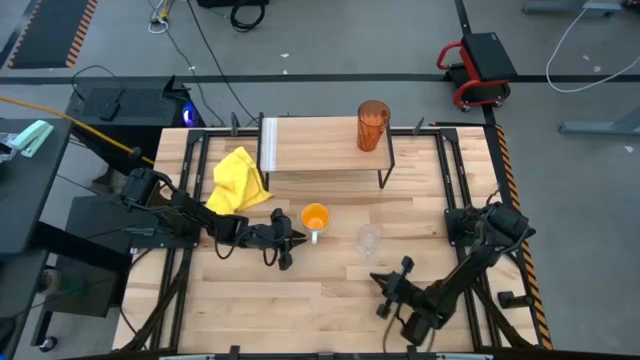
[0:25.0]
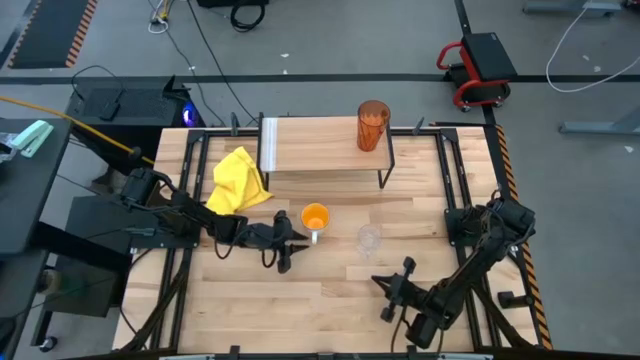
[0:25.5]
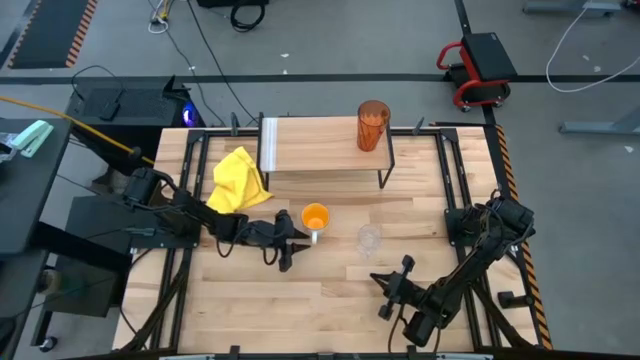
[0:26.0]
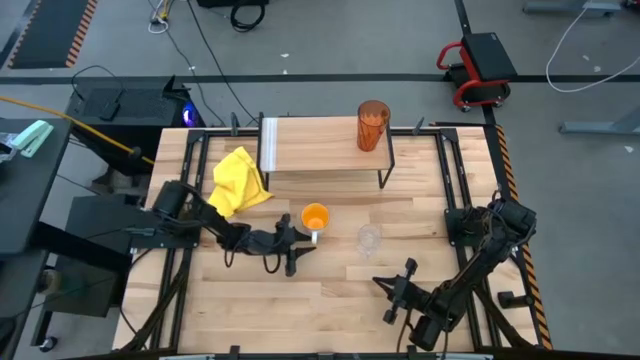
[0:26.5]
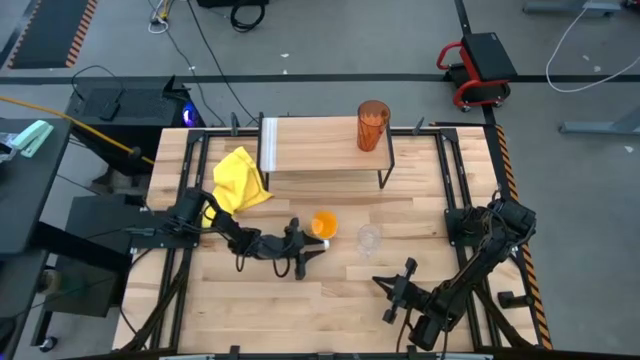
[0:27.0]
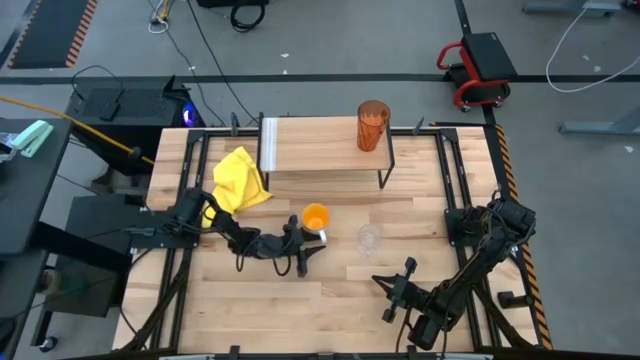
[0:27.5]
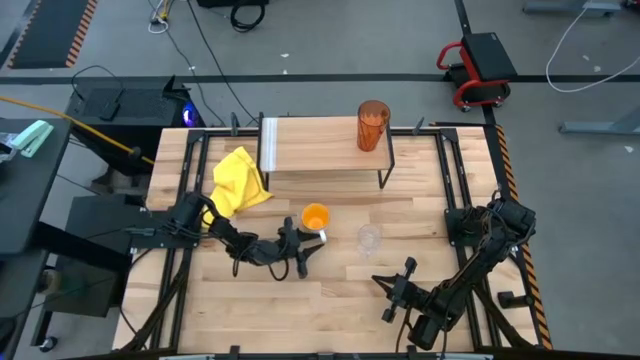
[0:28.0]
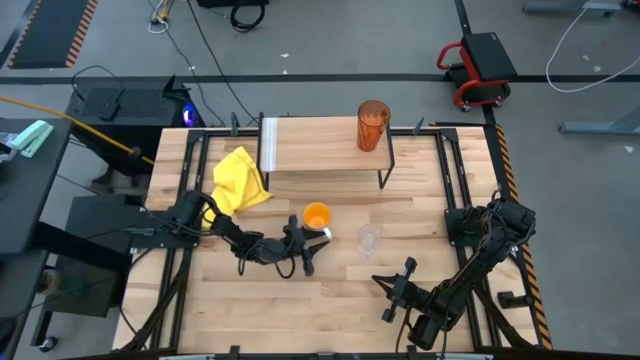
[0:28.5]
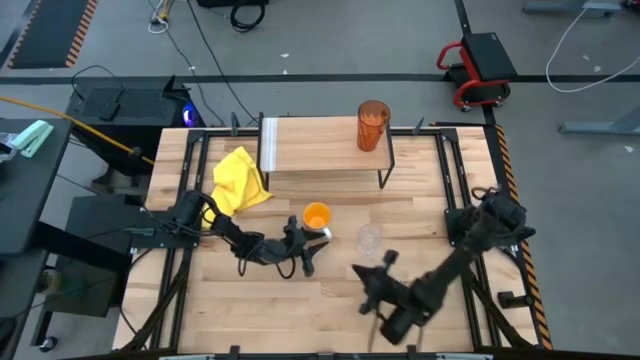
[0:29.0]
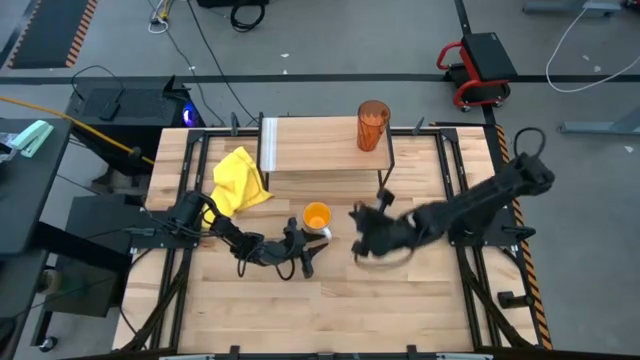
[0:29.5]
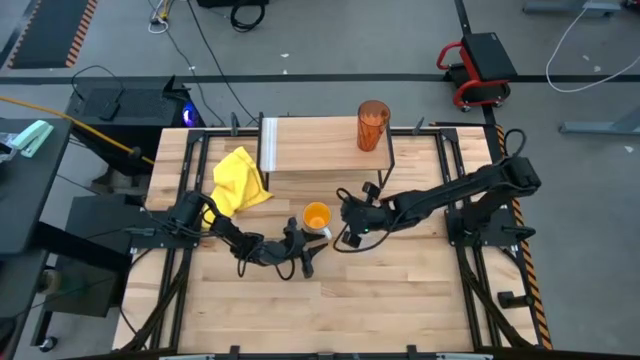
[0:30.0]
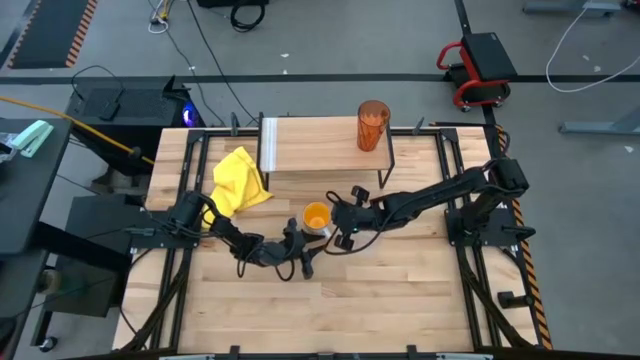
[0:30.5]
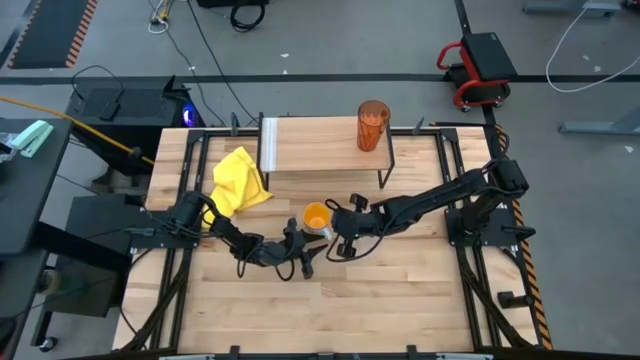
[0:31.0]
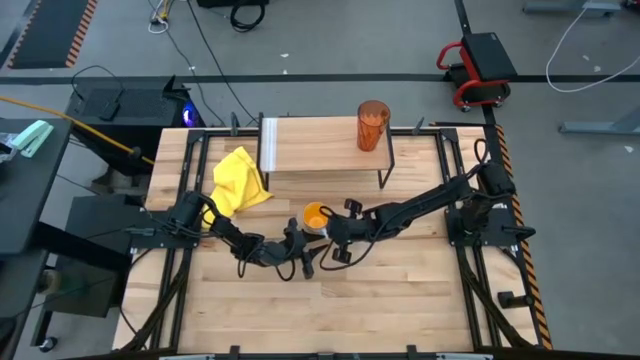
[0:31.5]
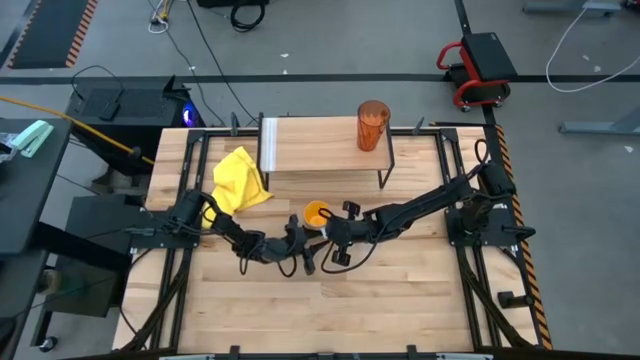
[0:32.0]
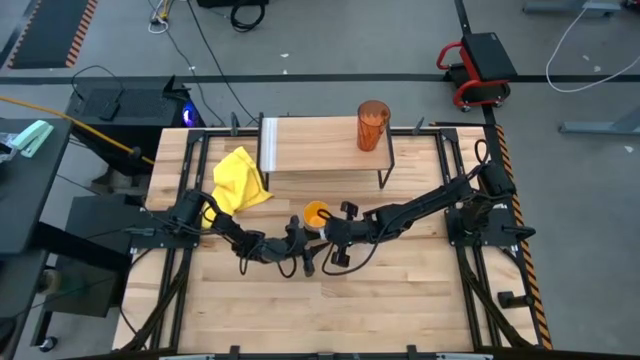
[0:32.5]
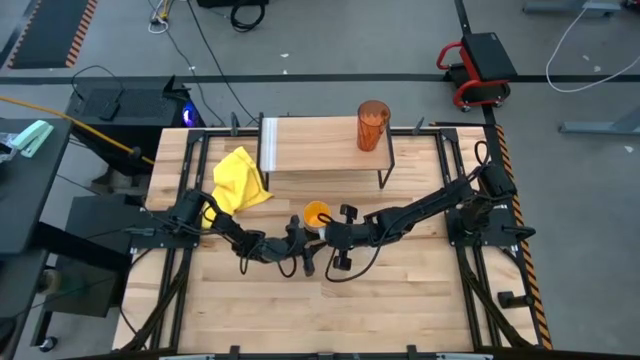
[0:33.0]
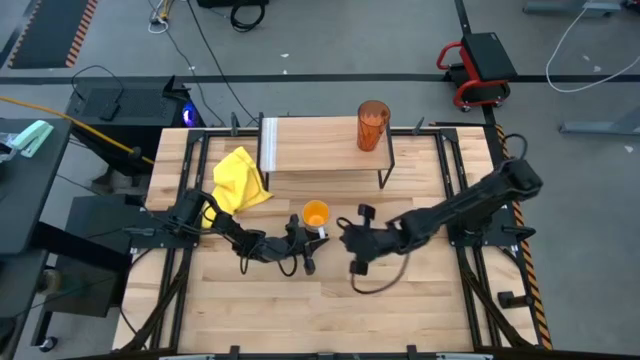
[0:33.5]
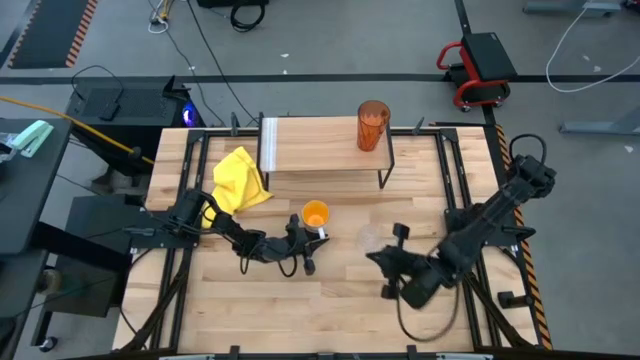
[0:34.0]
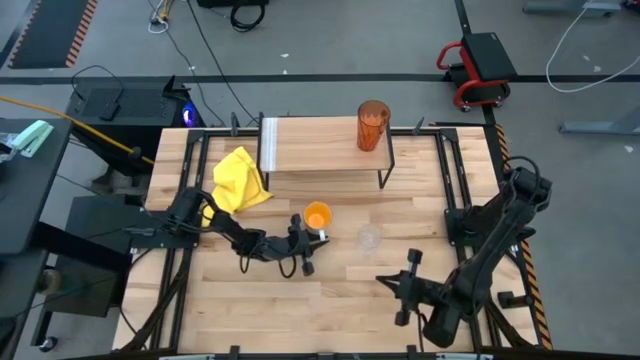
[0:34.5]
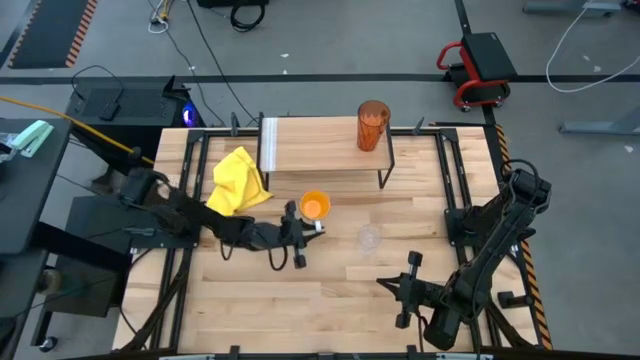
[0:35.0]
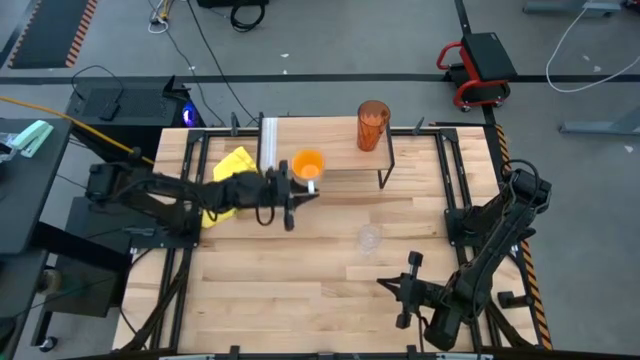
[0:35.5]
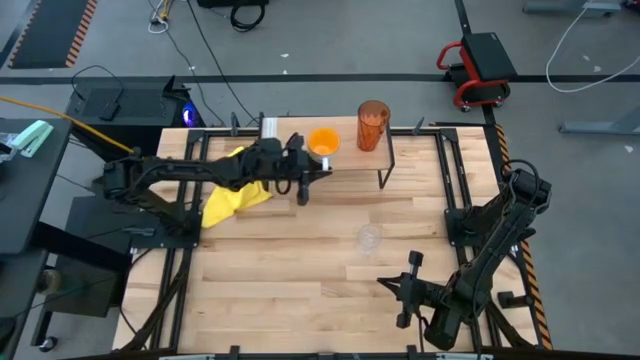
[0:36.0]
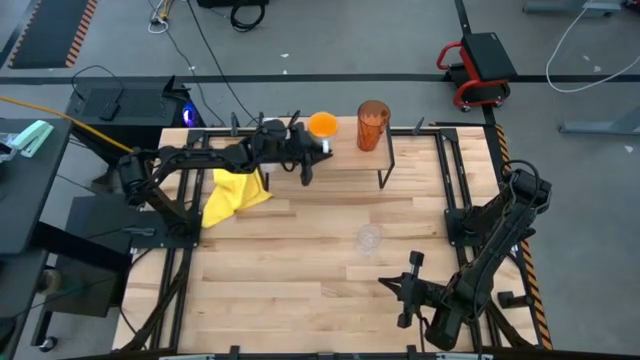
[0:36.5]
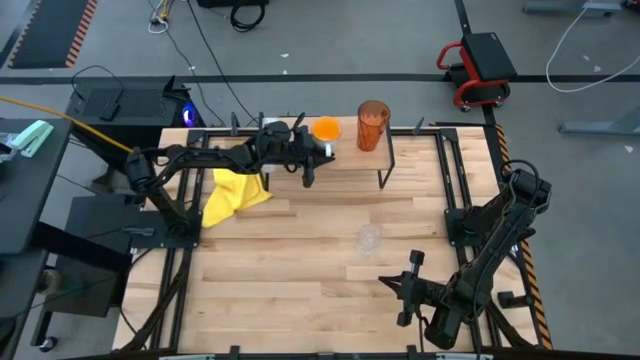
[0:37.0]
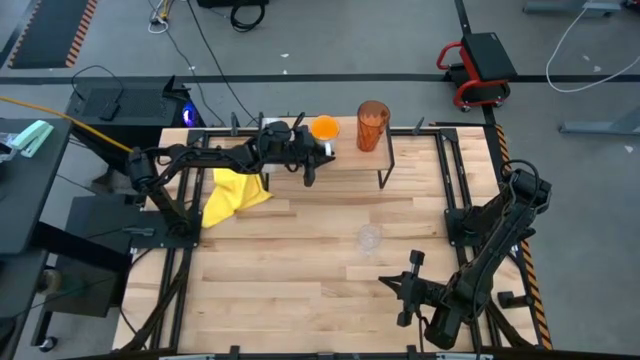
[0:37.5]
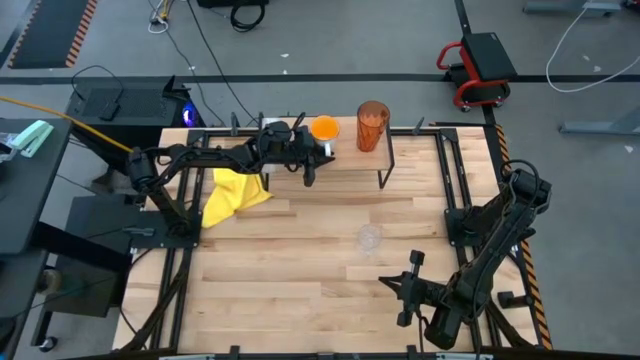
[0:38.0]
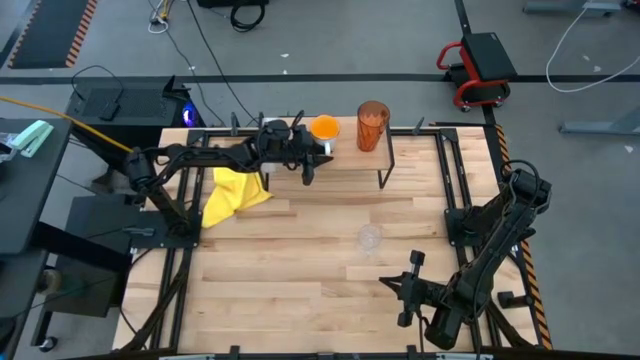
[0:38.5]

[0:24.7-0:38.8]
Task: Stack small to large cups/mugs on shelf
Put the yellow mug on the shelf

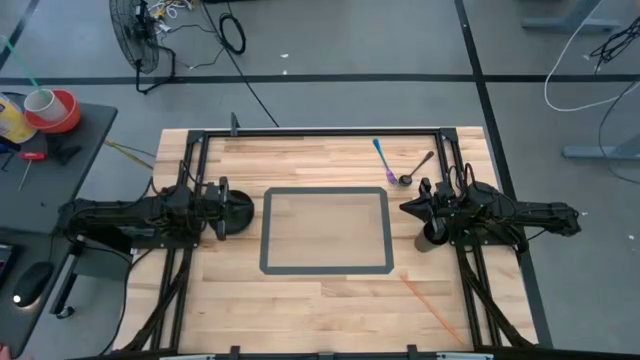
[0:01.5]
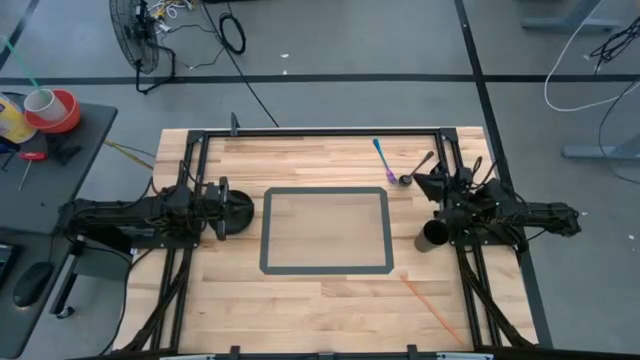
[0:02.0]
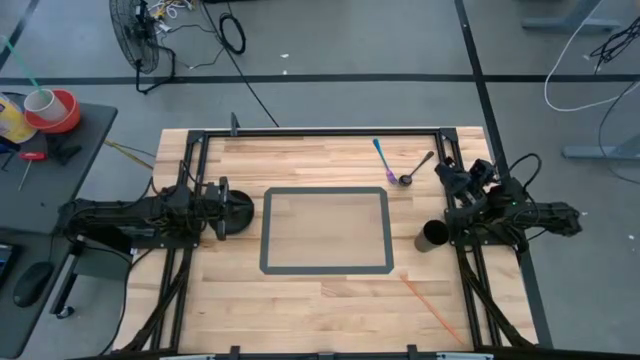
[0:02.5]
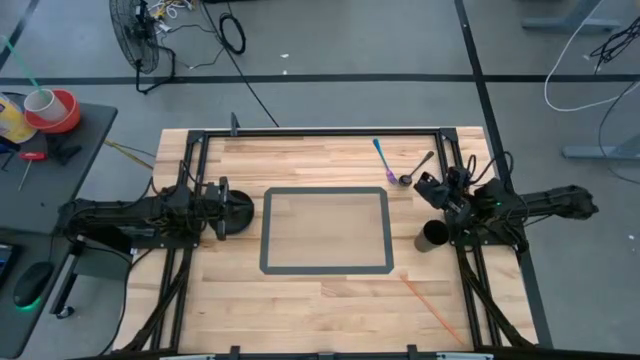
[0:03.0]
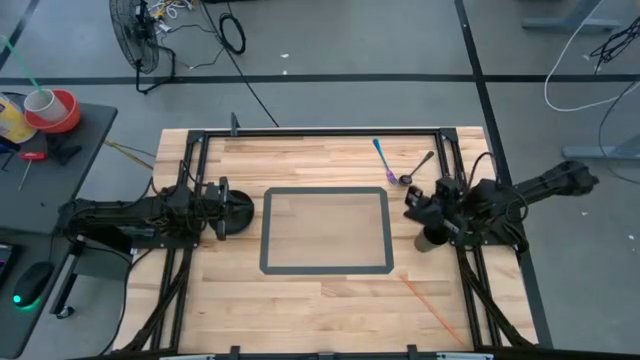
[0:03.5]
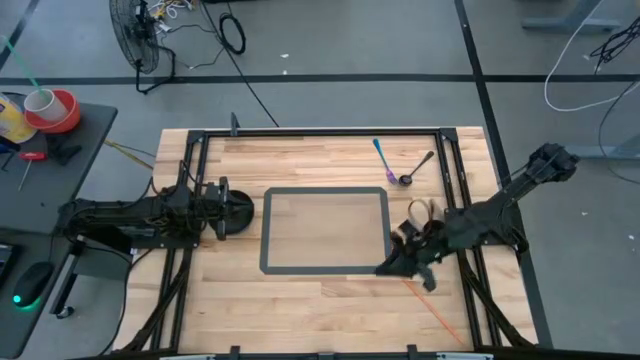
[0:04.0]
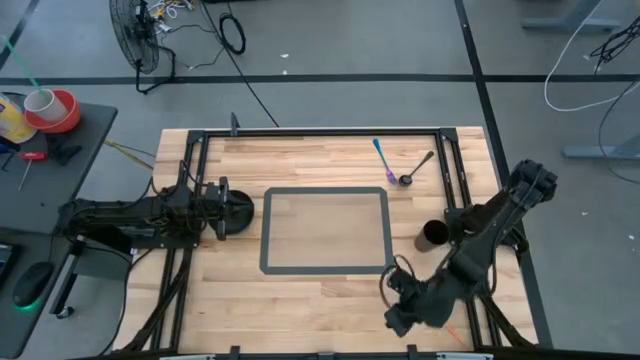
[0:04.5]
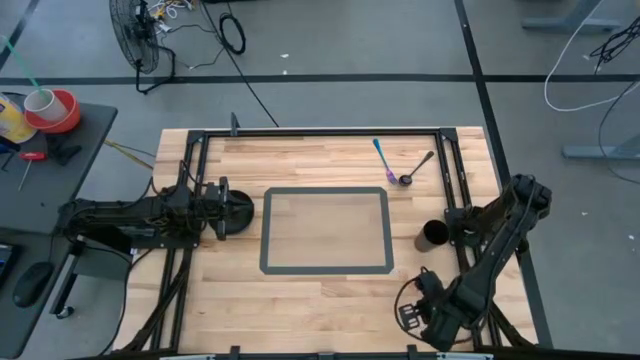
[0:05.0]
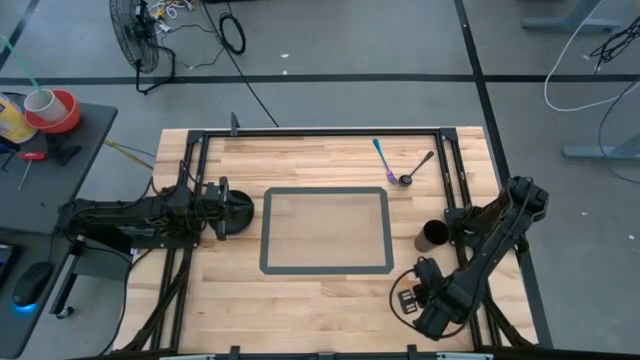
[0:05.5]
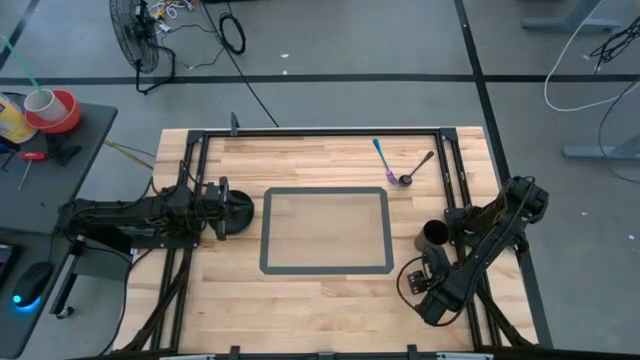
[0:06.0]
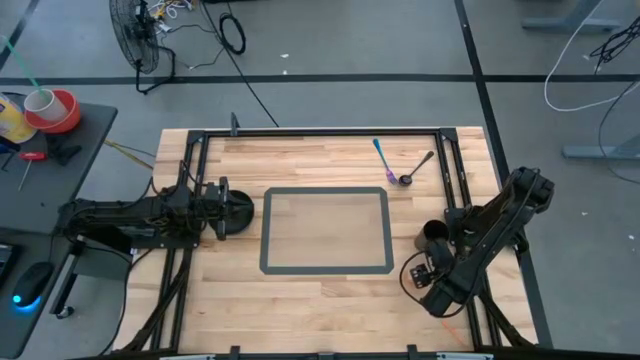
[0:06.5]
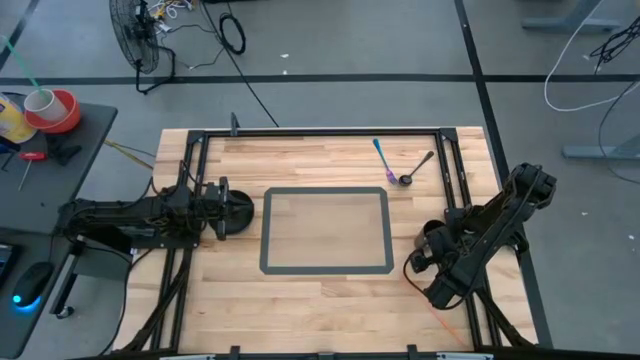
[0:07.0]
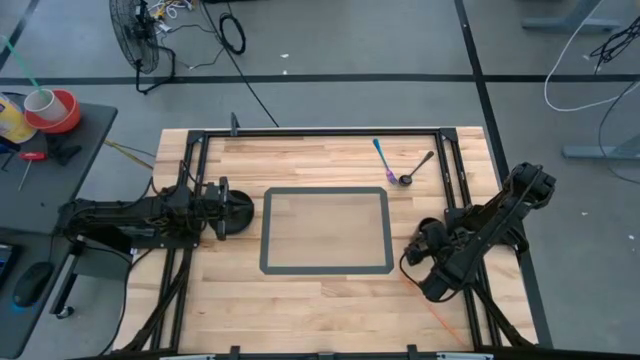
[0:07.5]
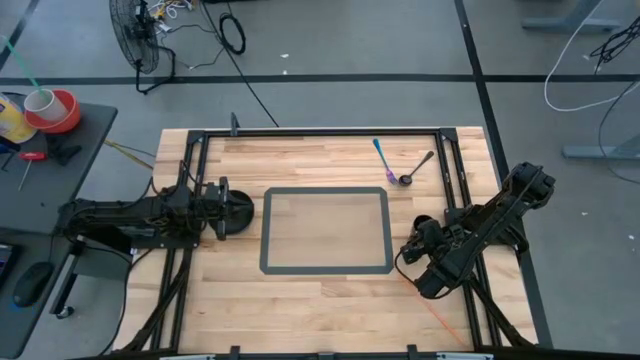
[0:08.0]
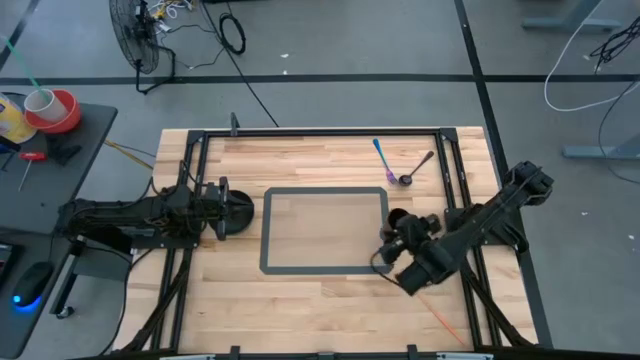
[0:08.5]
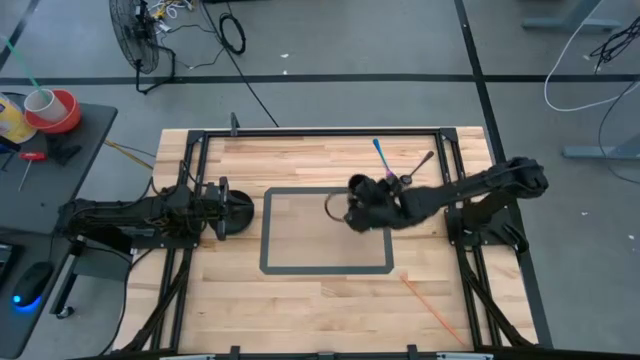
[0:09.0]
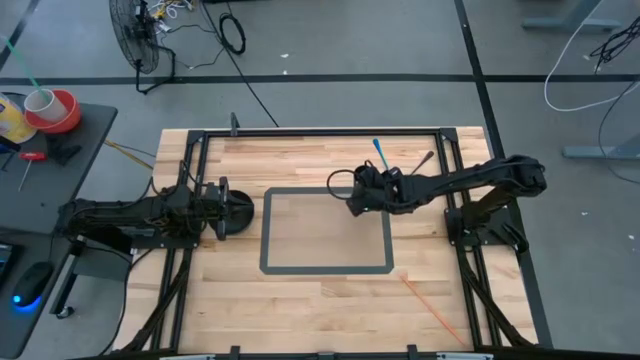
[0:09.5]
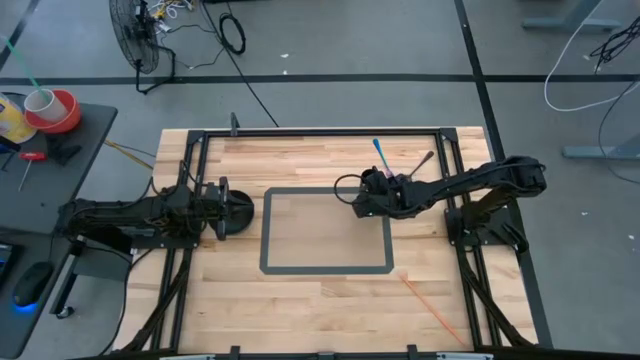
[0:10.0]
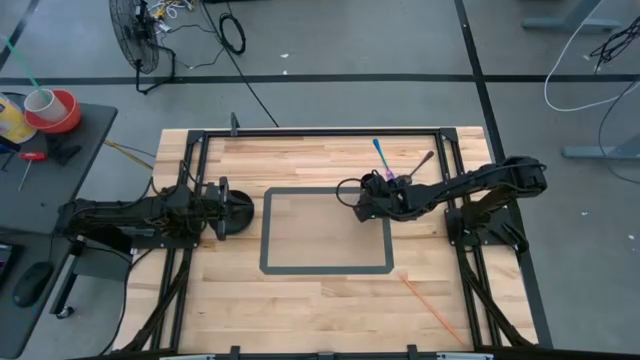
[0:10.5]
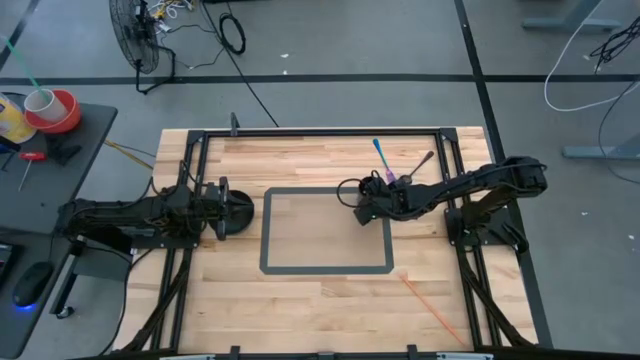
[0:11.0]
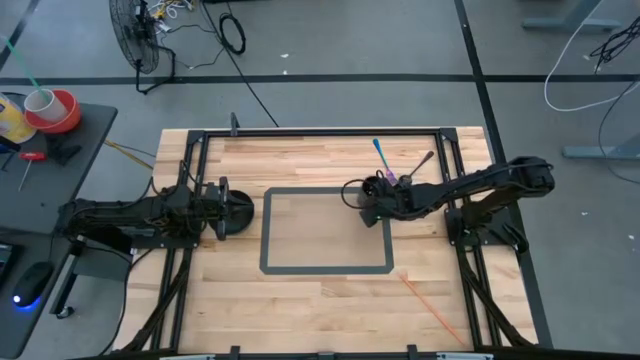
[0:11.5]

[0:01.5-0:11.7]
Task: Pick & Place Utensil
Put the black cup on the transparent mat
